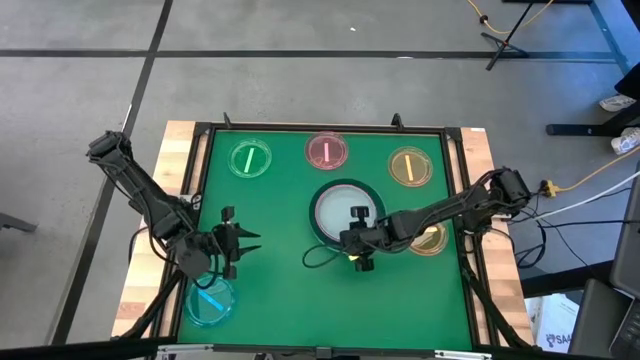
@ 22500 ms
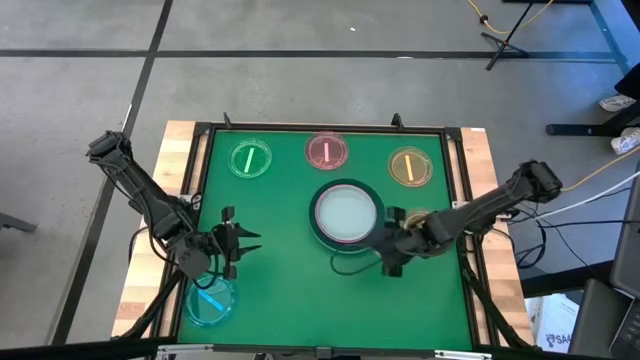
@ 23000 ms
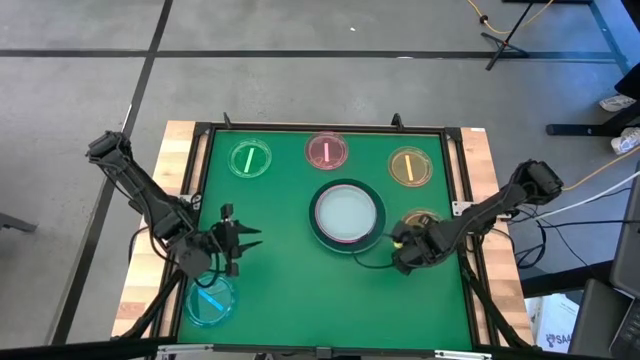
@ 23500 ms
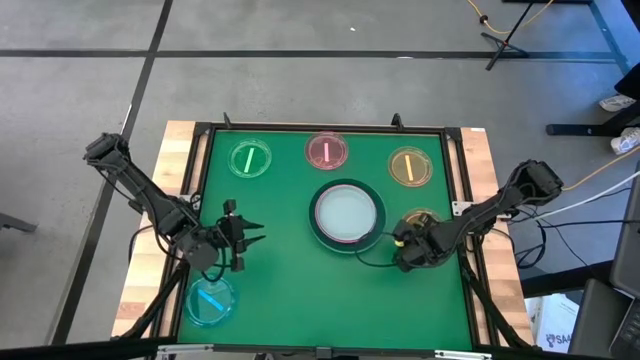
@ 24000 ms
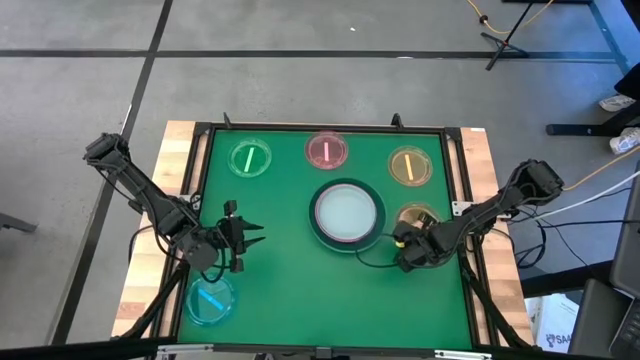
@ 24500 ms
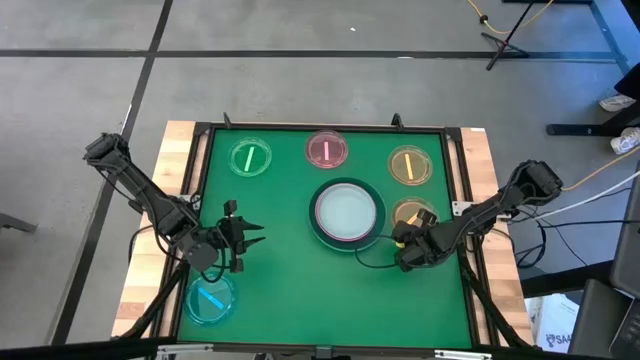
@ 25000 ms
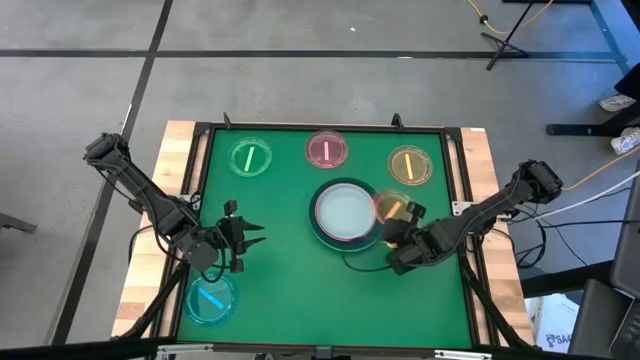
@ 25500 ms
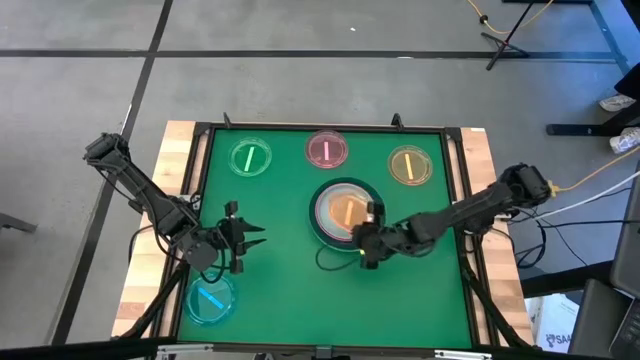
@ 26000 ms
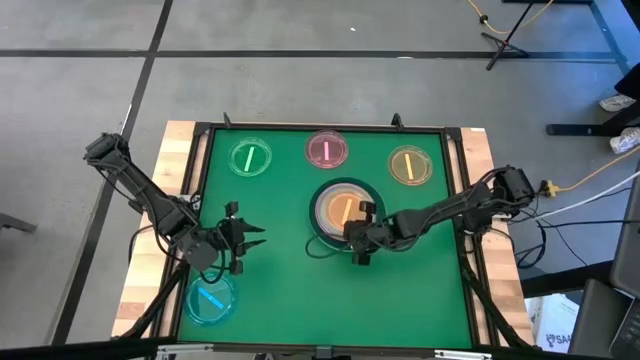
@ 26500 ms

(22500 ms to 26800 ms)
Task: Stack plastic plates
Stack the bottom orange plate on top of the light blue plate

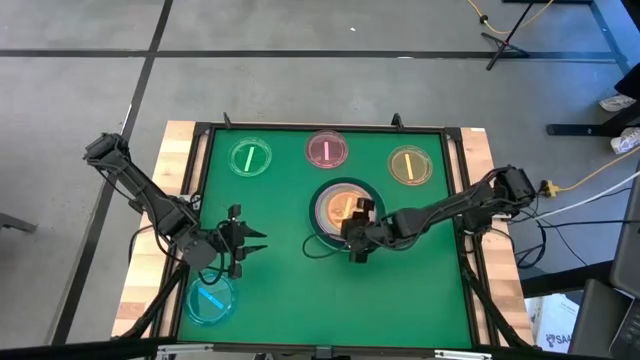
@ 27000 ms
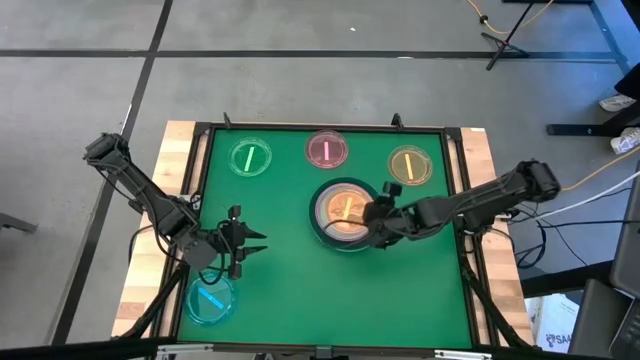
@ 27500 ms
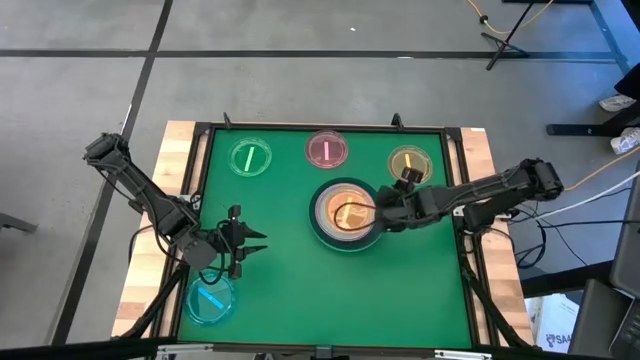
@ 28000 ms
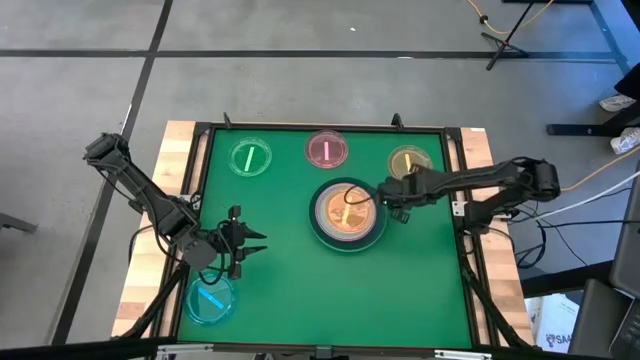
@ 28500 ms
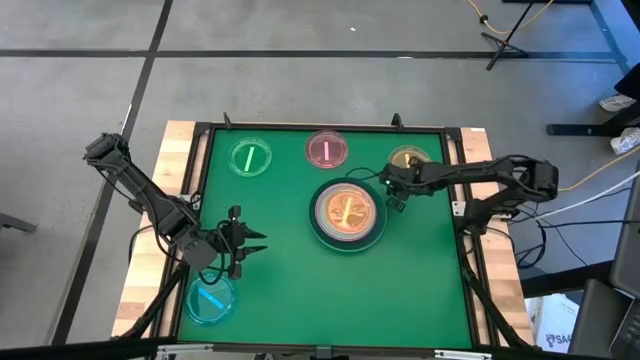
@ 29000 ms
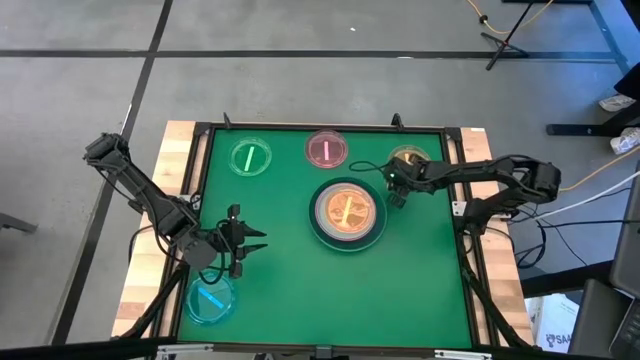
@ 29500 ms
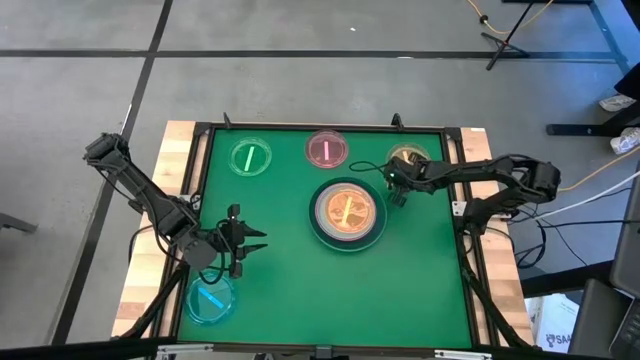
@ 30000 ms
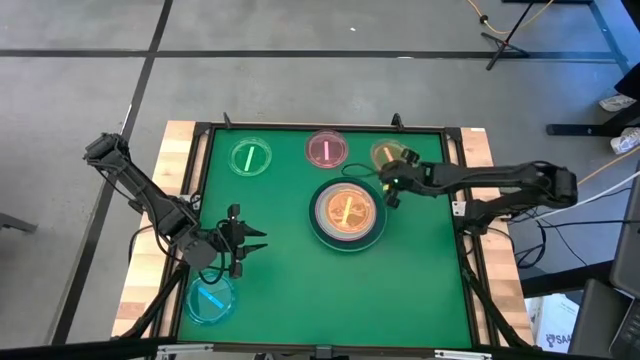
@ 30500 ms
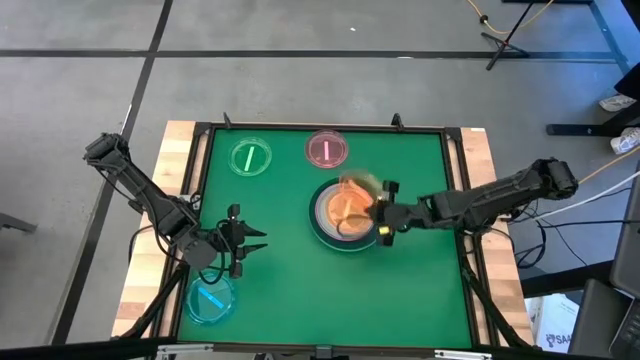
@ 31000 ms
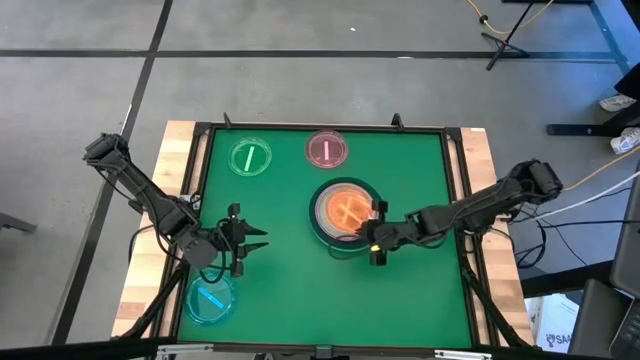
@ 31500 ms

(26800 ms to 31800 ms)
Stack the orange plate on top of the other orange plate

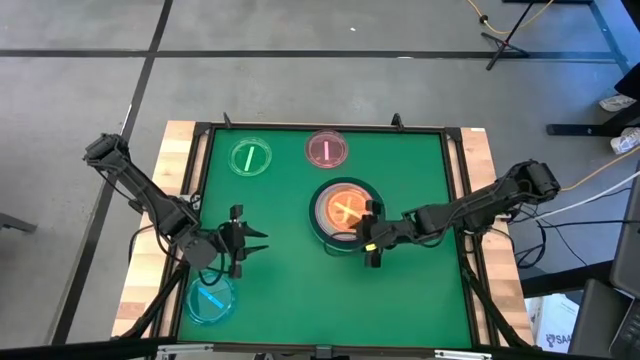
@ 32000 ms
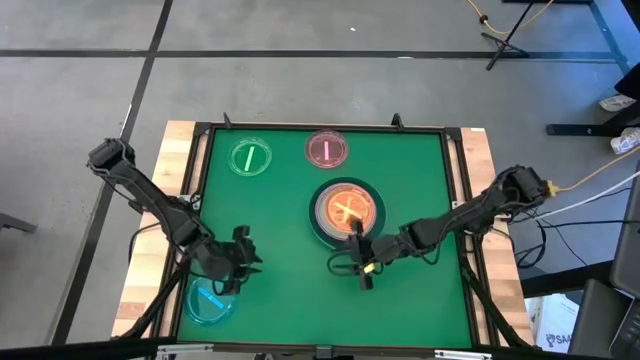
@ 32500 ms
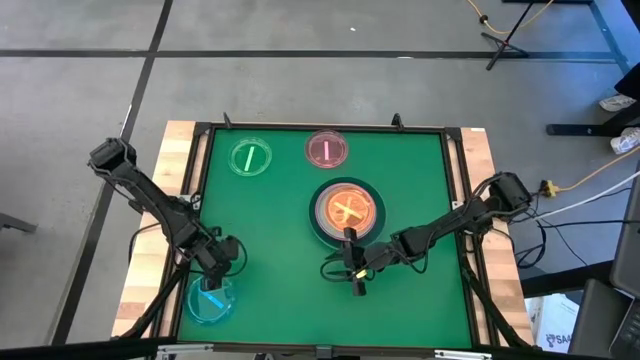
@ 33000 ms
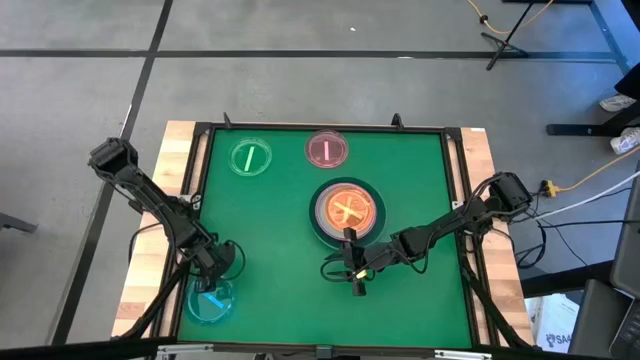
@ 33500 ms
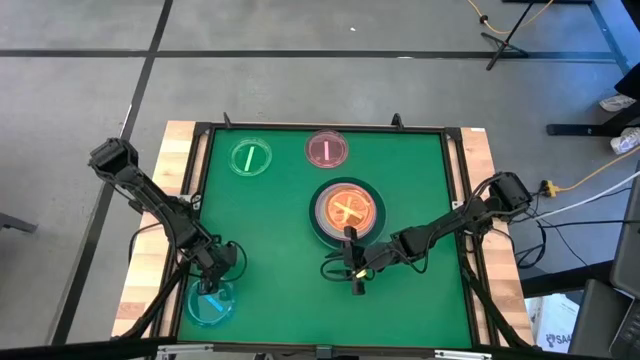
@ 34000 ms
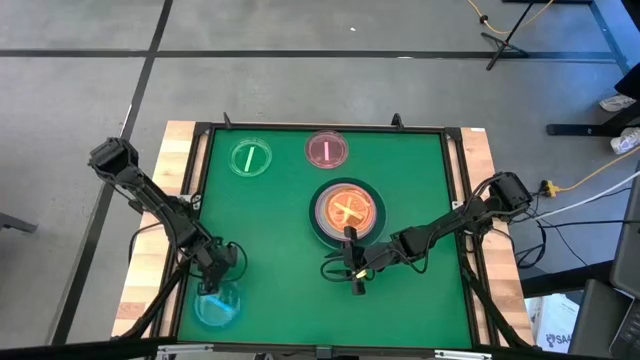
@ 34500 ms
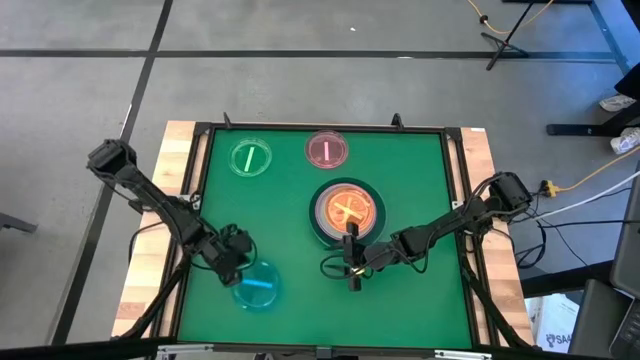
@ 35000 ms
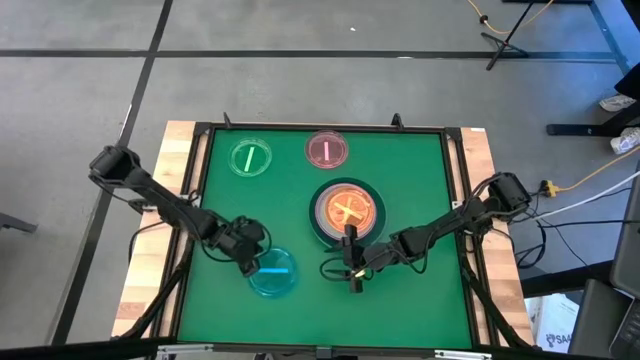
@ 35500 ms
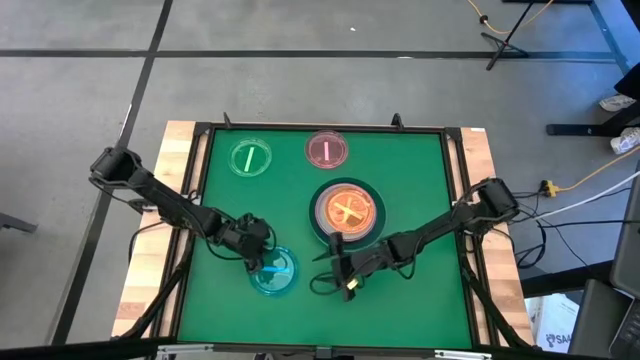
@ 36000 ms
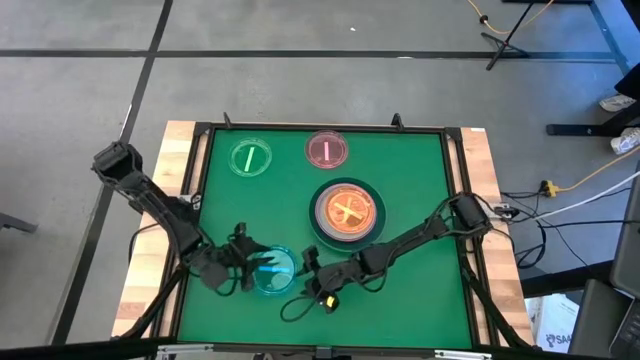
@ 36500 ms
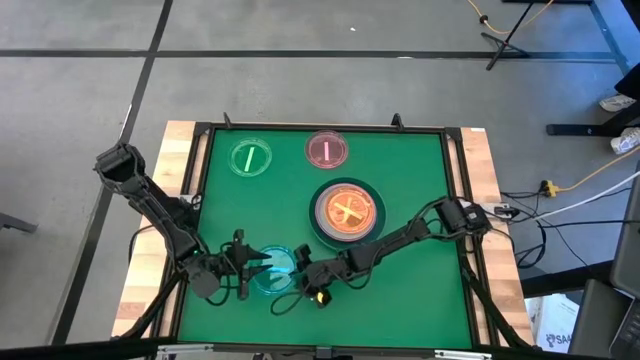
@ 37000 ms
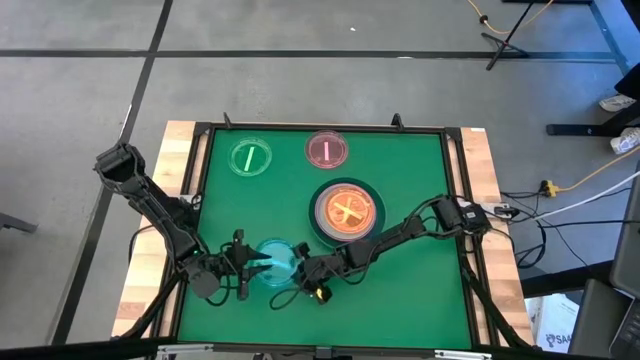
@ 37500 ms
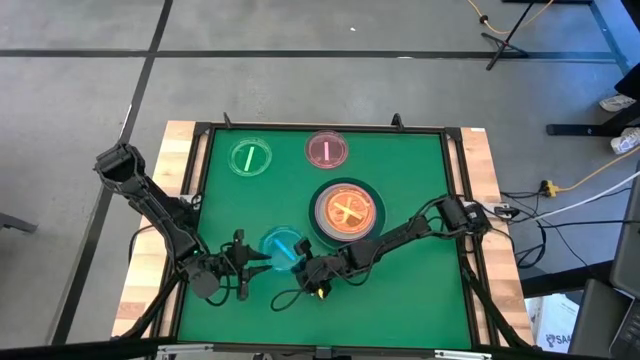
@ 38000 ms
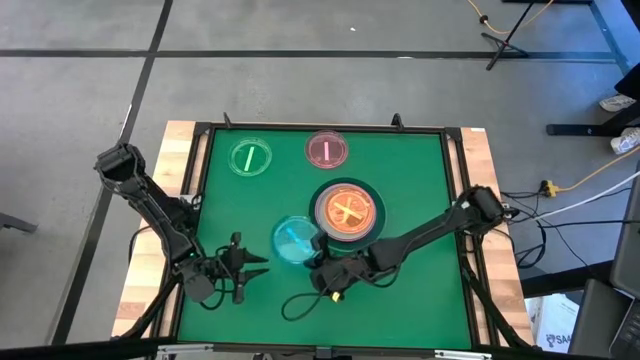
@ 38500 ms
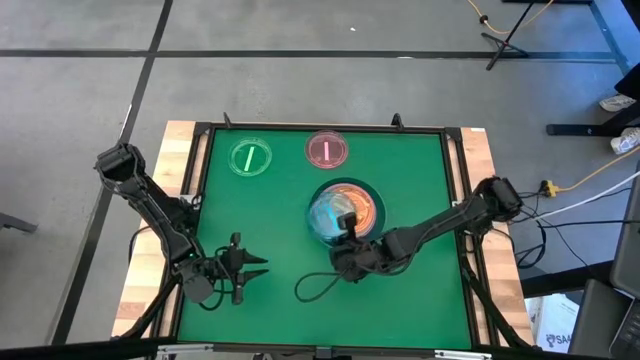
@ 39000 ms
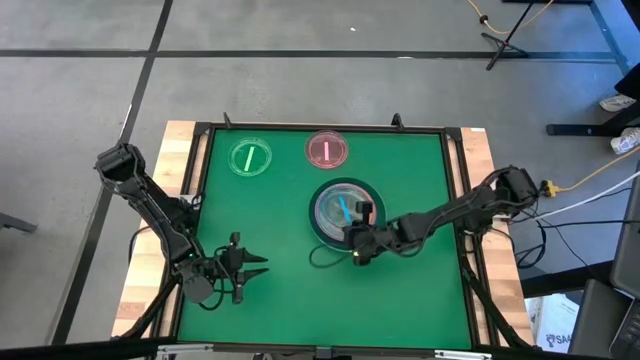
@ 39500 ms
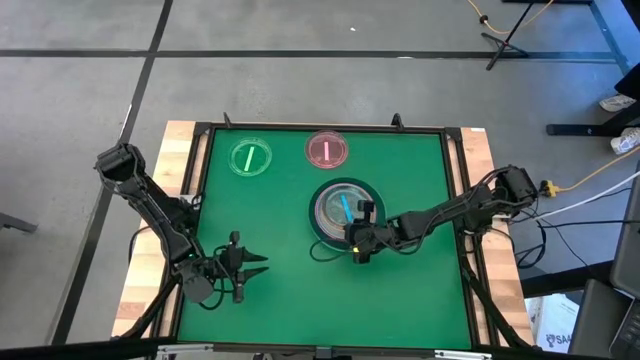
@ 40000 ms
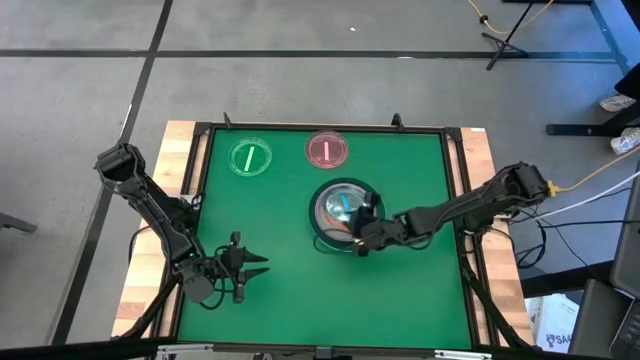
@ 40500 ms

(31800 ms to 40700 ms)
Stack the blue plate on top of the orange plate

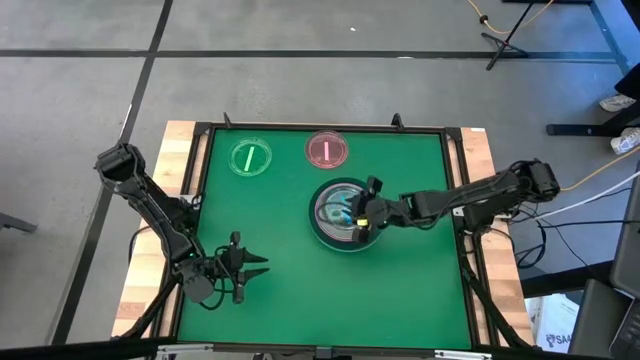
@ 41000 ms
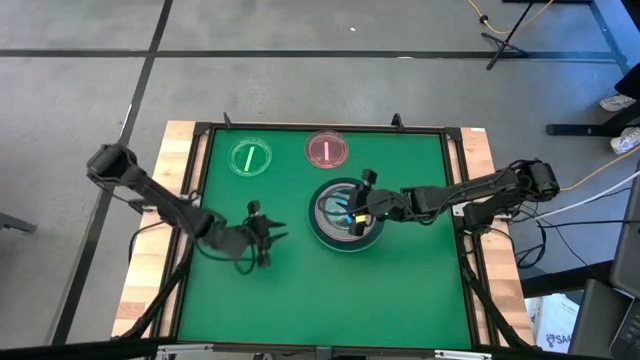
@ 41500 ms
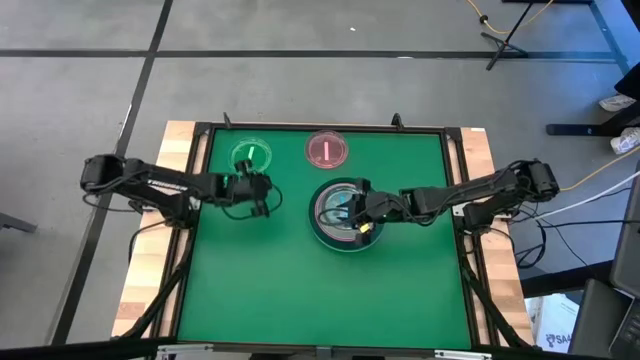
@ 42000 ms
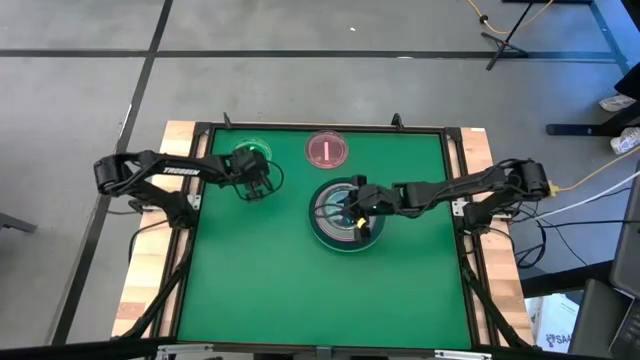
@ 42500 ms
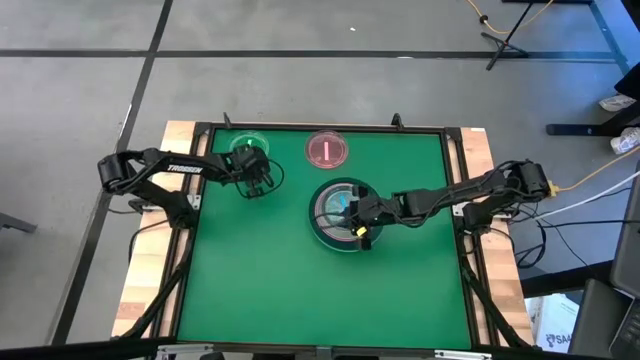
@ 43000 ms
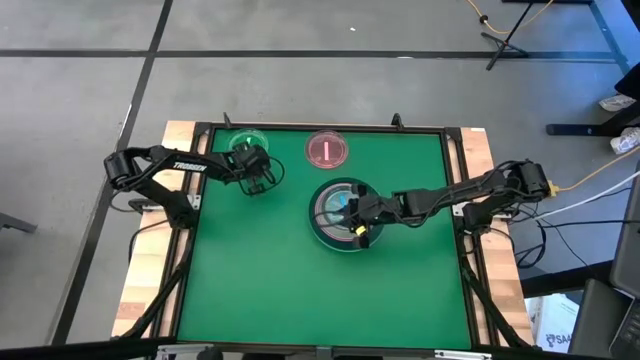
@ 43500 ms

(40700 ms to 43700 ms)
Stack the green plate on top of the blue plate
